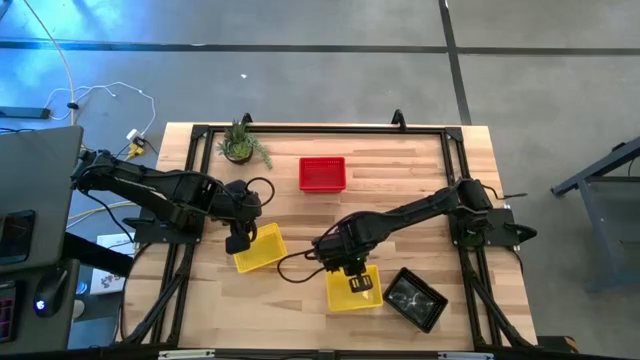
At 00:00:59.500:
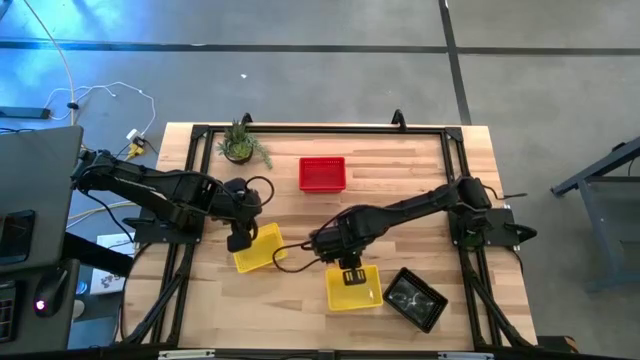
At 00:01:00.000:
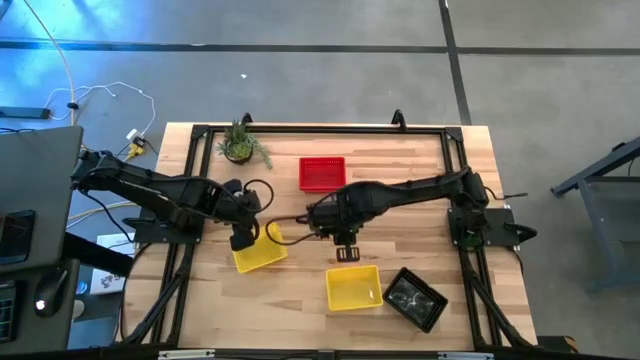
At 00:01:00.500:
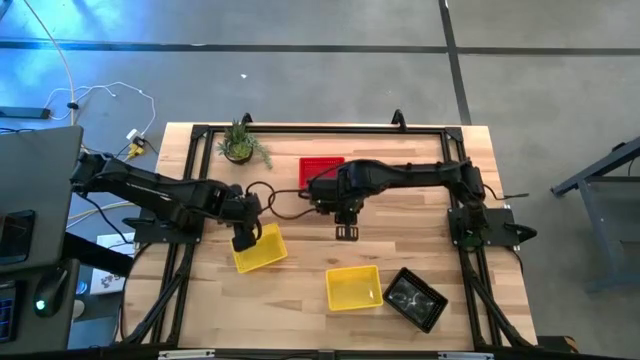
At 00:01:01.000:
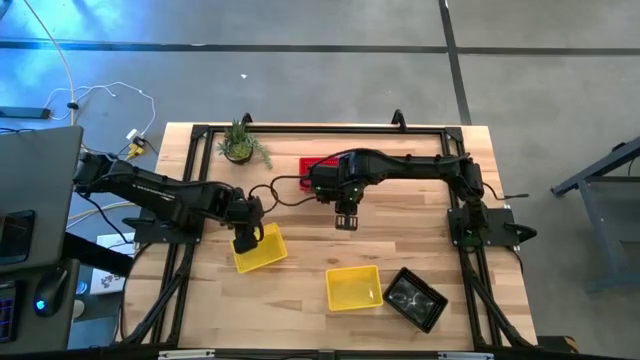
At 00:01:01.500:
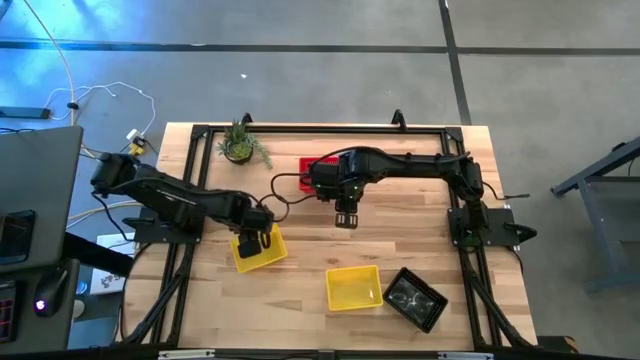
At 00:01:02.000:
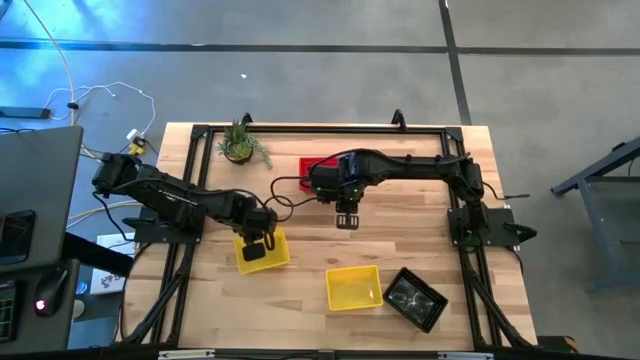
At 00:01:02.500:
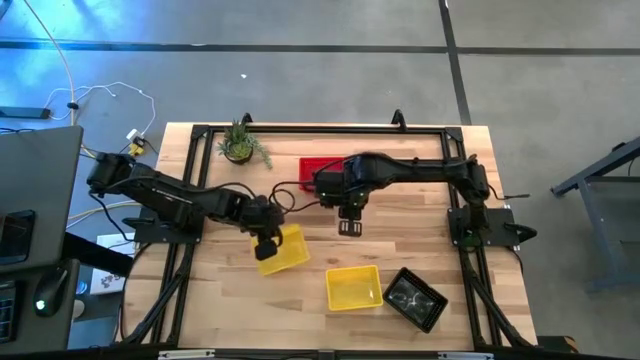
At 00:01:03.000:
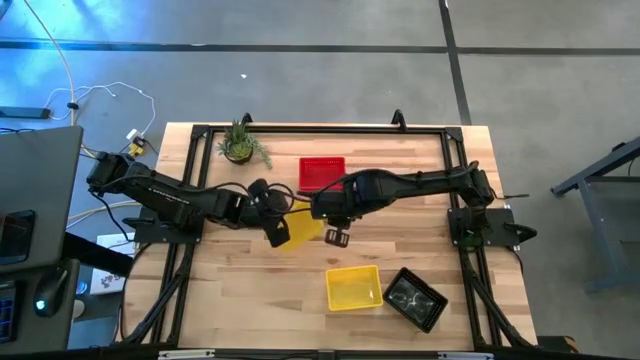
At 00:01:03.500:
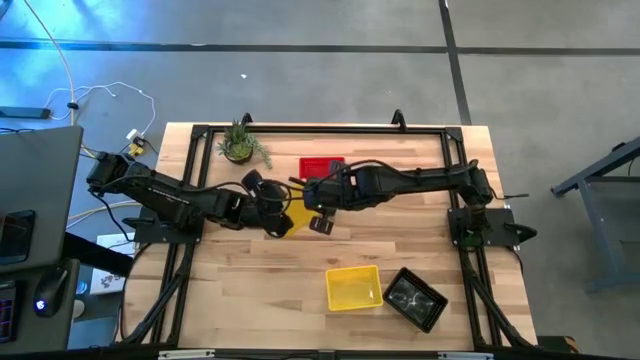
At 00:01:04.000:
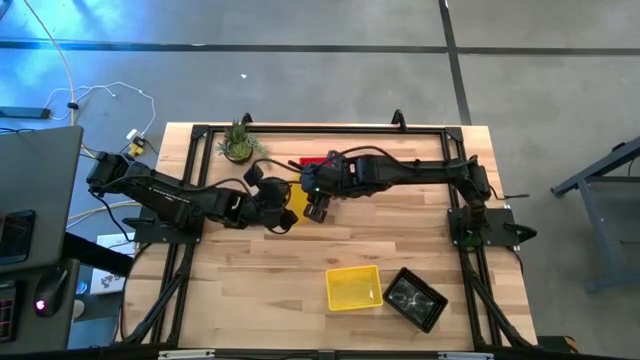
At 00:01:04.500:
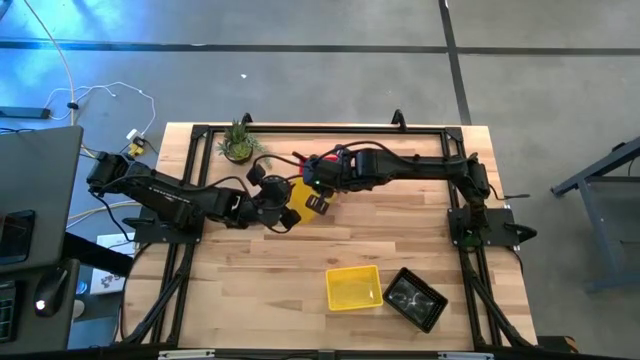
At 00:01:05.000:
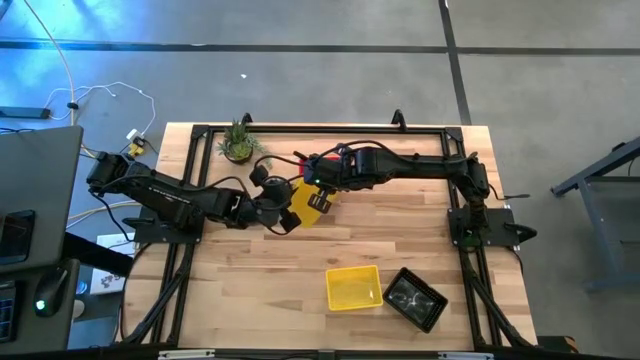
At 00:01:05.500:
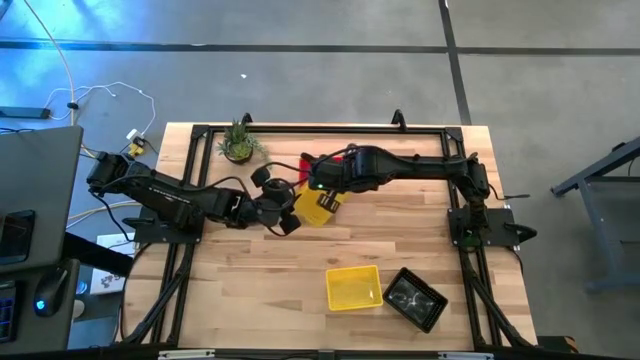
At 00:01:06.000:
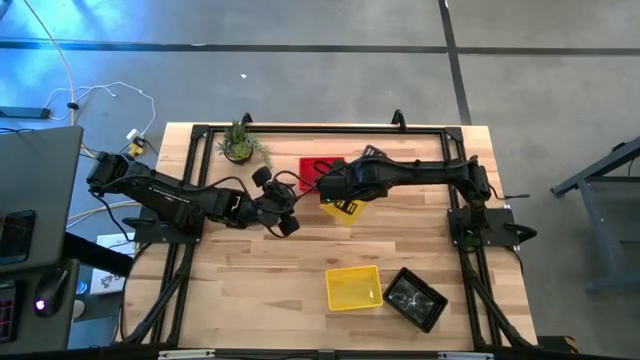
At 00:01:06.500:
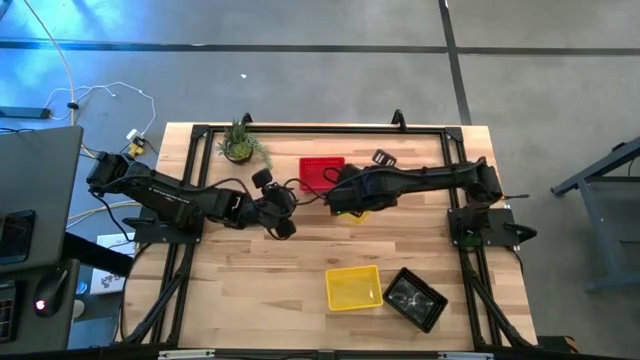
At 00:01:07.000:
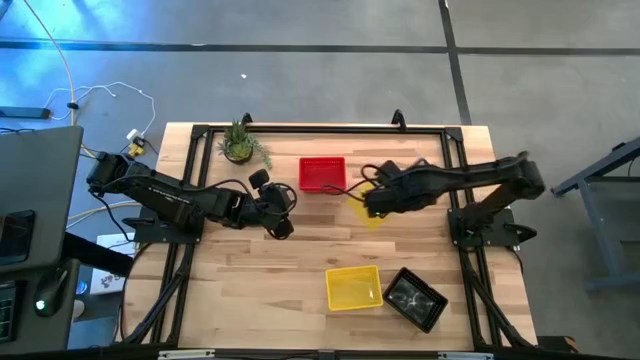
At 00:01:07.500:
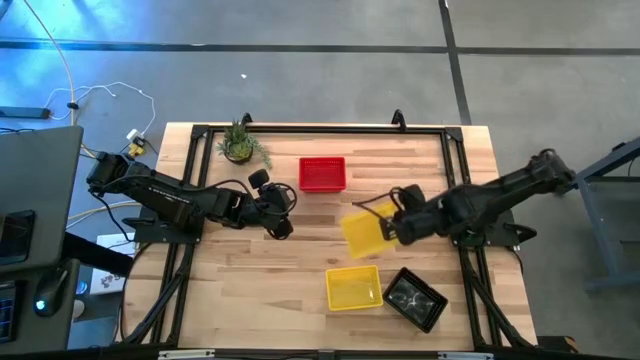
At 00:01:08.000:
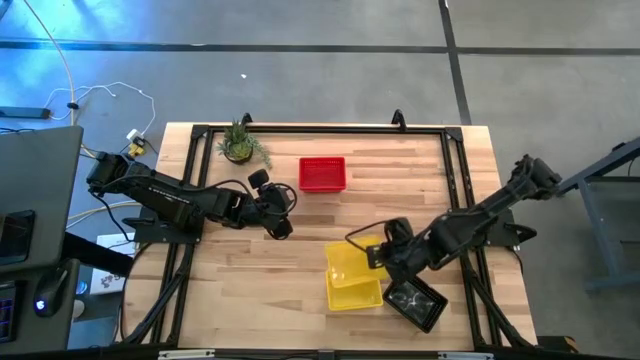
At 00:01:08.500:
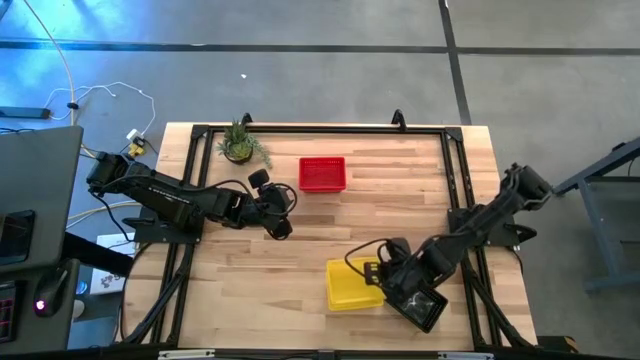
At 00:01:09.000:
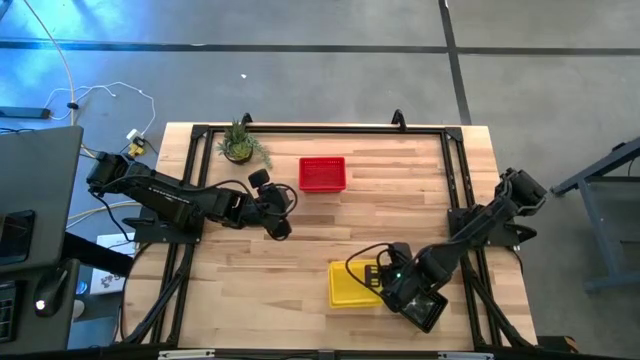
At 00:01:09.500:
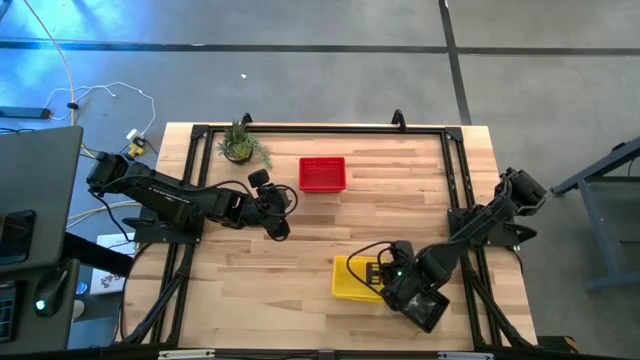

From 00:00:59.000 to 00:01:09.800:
Stack the yellow basket on top of the yellow baskets

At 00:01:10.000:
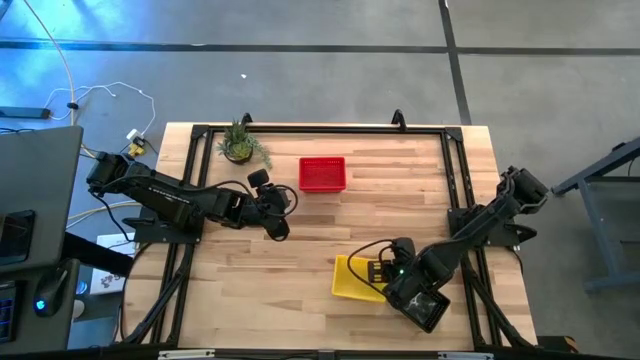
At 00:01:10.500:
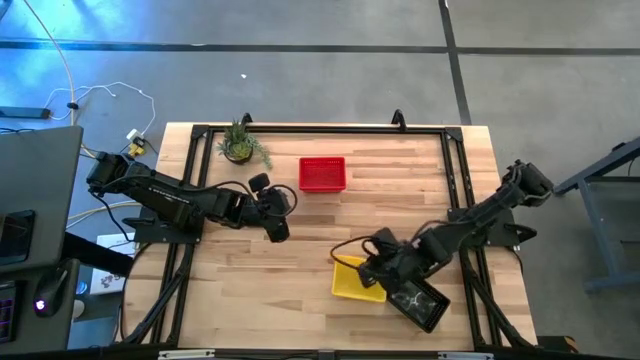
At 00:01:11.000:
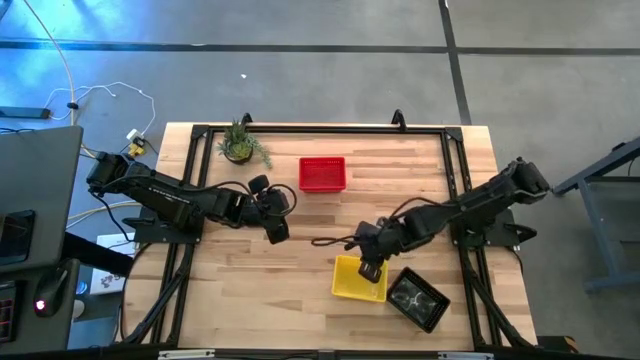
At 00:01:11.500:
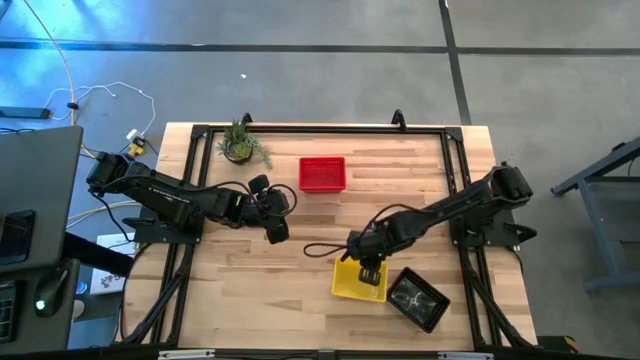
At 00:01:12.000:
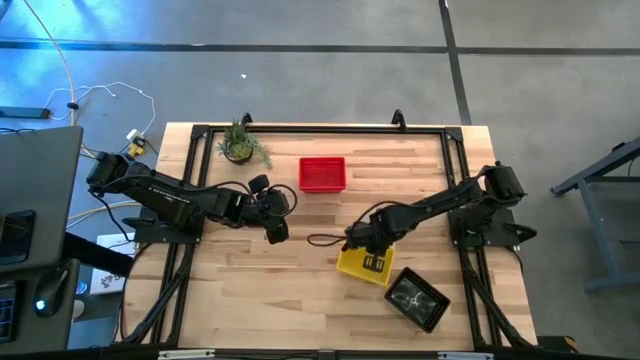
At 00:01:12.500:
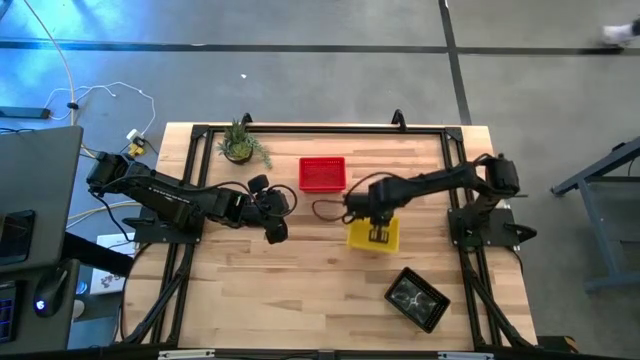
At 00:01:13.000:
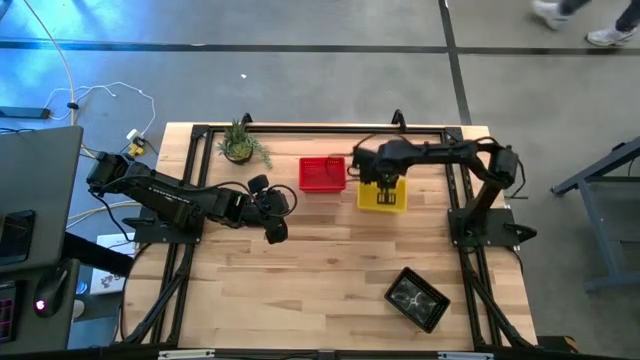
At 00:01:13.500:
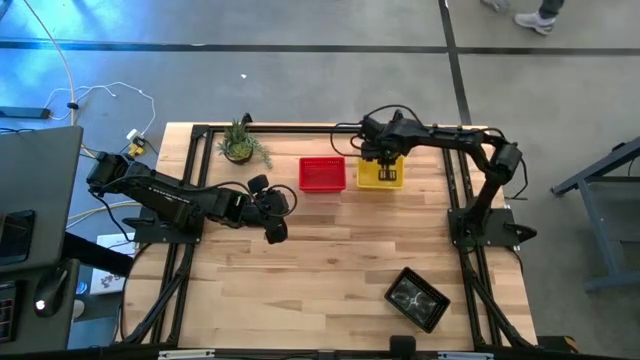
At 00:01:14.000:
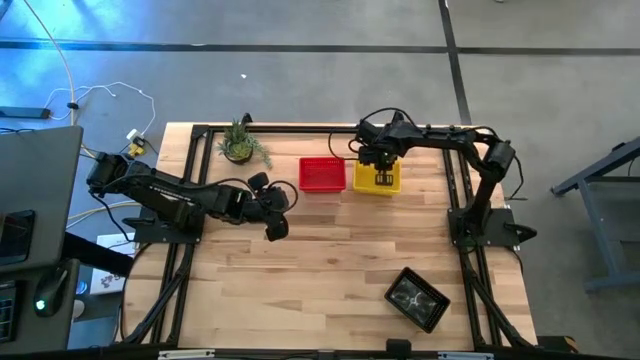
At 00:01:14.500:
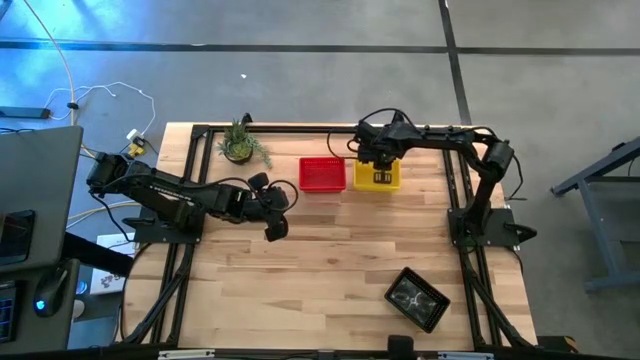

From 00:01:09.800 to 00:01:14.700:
Move the yellow baskets to the top right of the table

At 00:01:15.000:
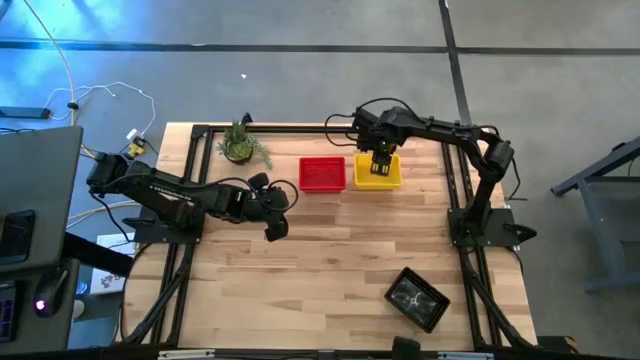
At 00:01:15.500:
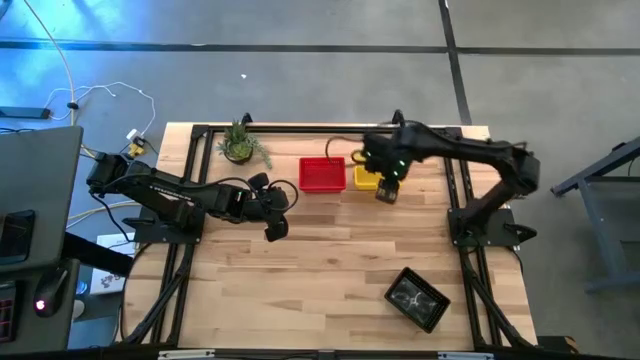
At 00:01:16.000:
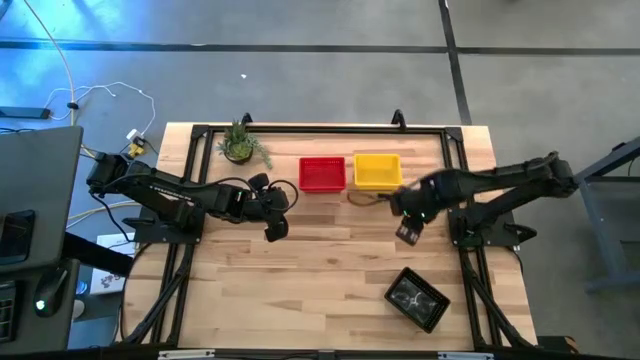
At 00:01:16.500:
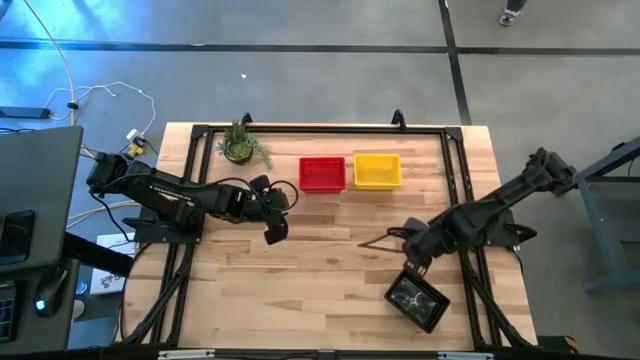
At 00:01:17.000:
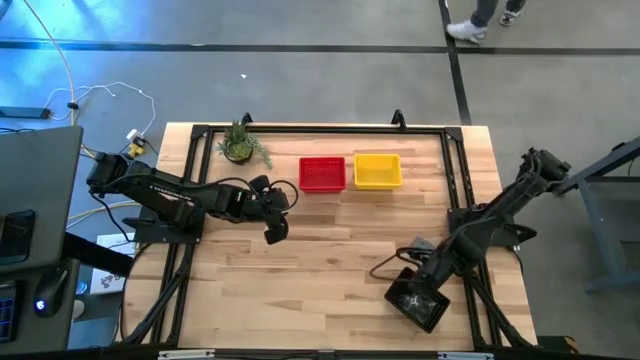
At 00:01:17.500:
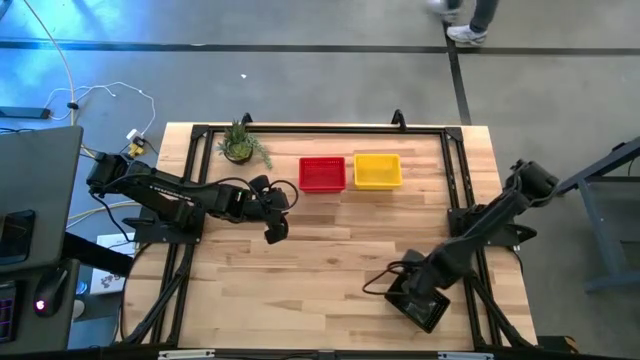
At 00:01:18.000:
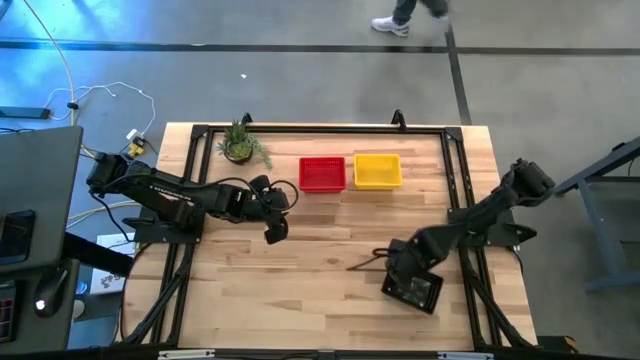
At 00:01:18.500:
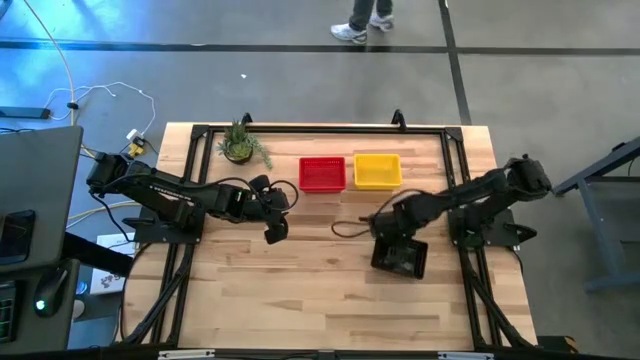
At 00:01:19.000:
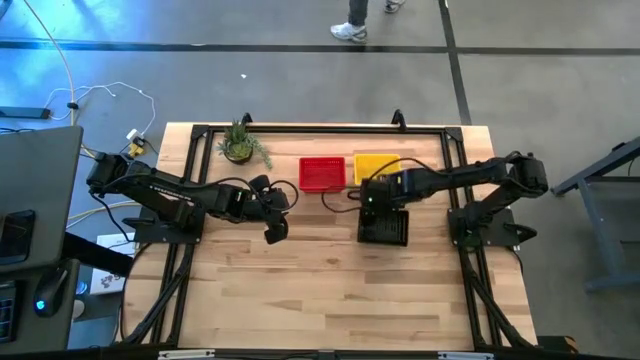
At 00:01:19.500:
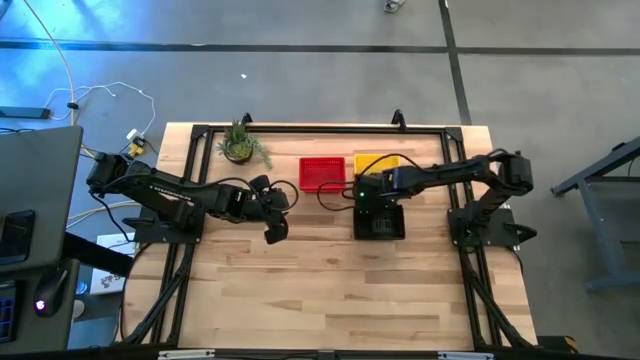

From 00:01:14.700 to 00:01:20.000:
Move the black baskets to the middle right of the table
